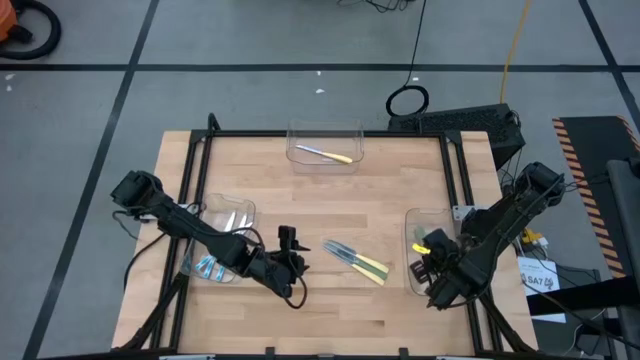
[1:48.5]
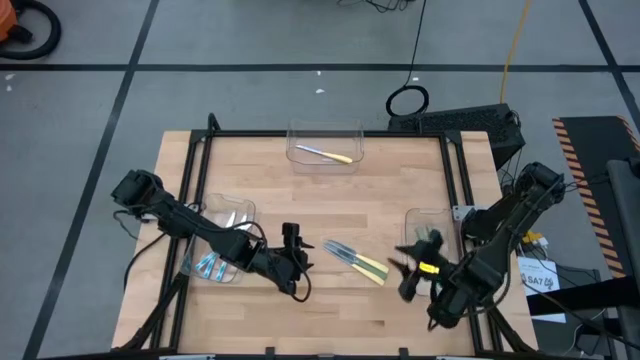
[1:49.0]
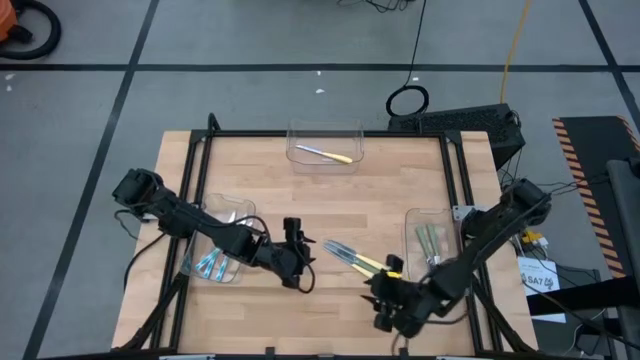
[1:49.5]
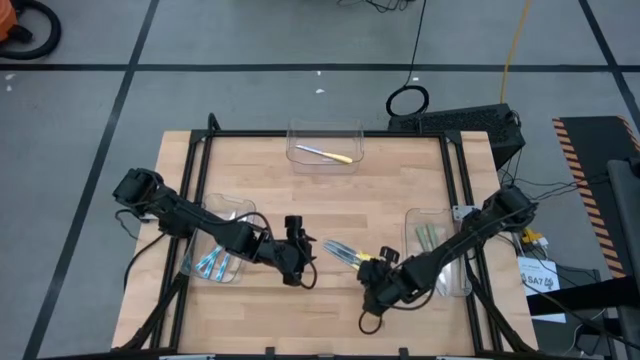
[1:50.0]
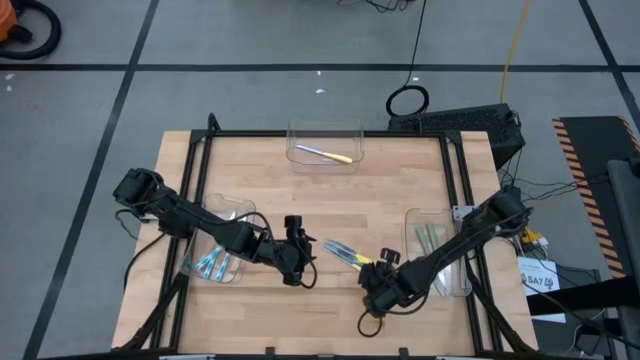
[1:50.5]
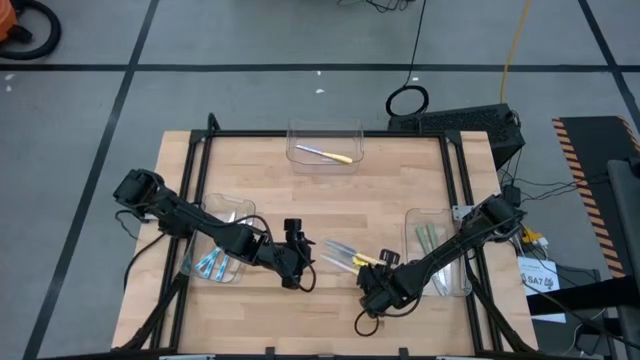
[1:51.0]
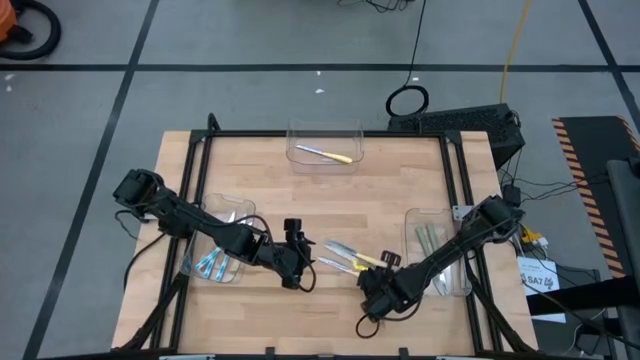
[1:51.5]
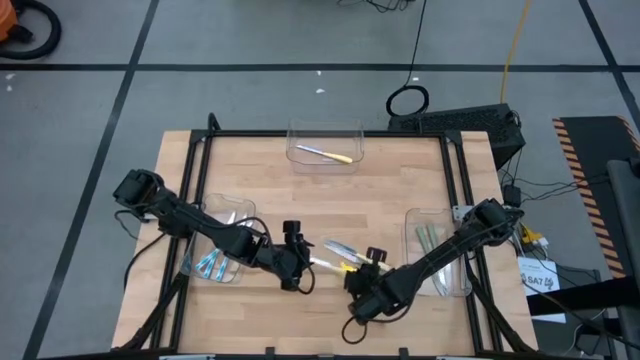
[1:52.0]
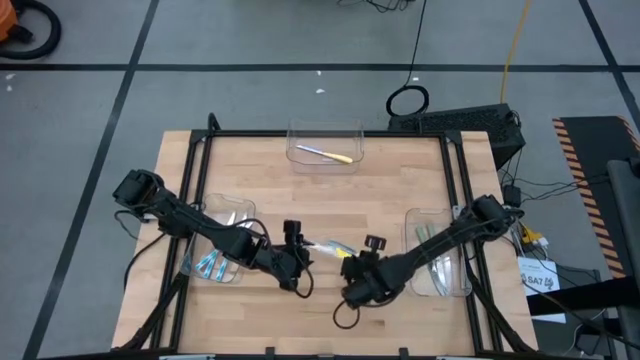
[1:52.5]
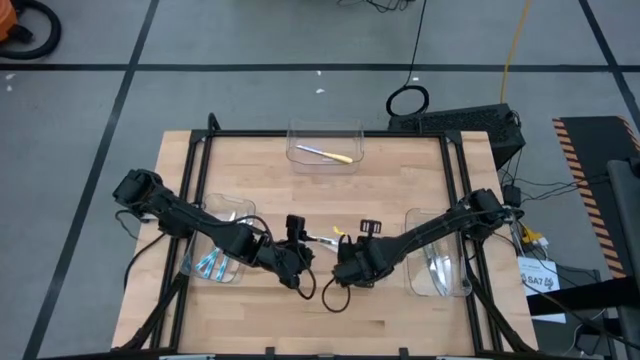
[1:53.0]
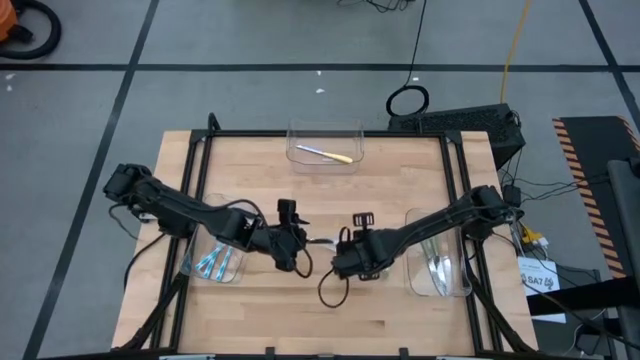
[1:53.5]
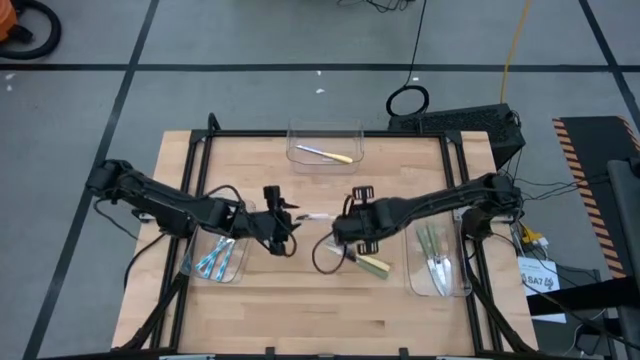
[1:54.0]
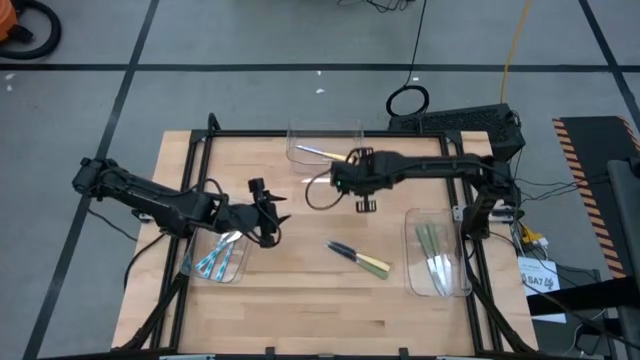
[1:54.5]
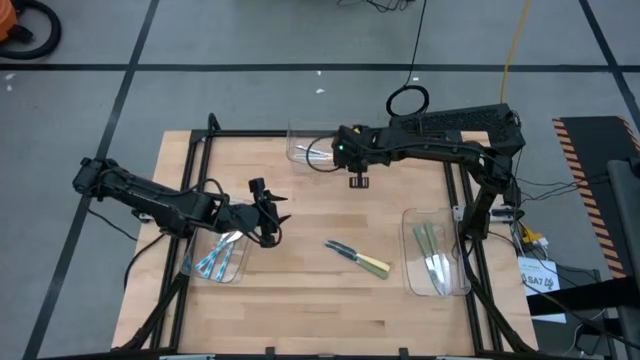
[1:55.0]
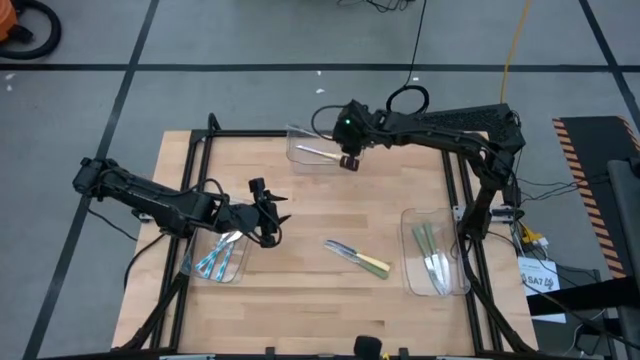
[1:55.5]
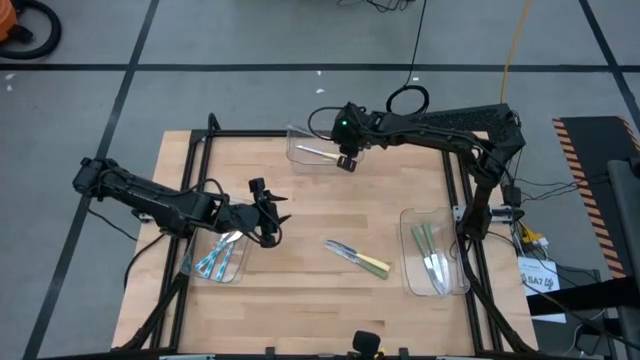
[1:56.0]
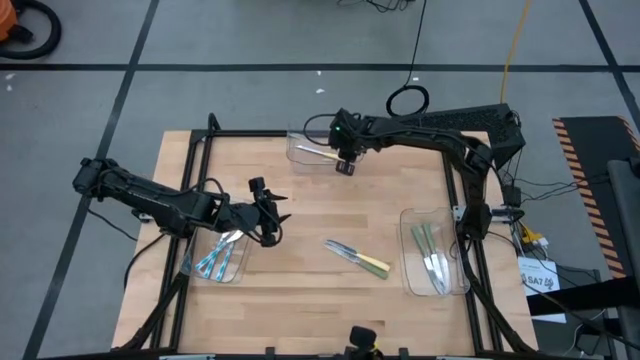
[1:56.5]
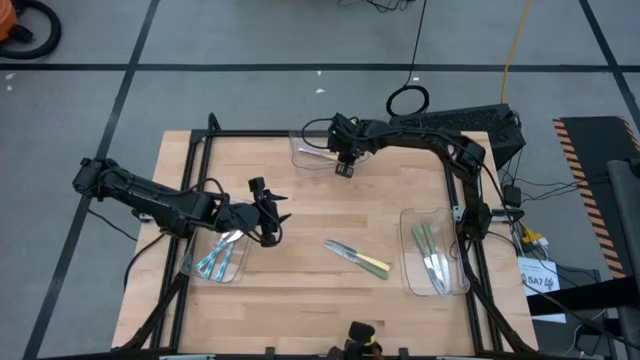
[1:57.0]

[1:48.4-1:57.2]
Task: Sort silverware by color (type)
Put the bottom yellow knife into the top center transparent bin

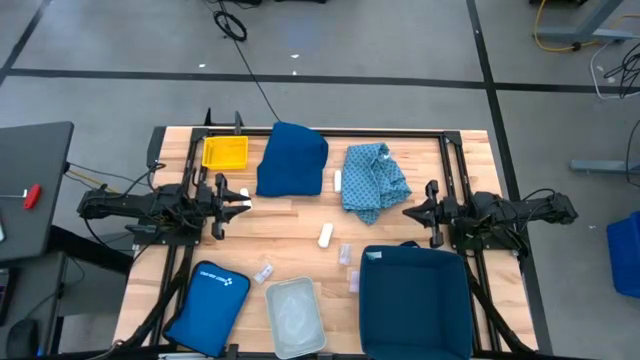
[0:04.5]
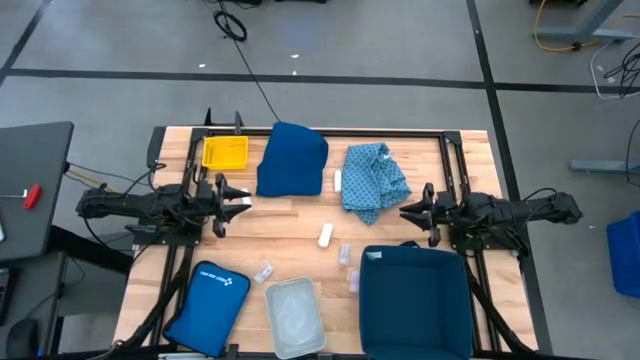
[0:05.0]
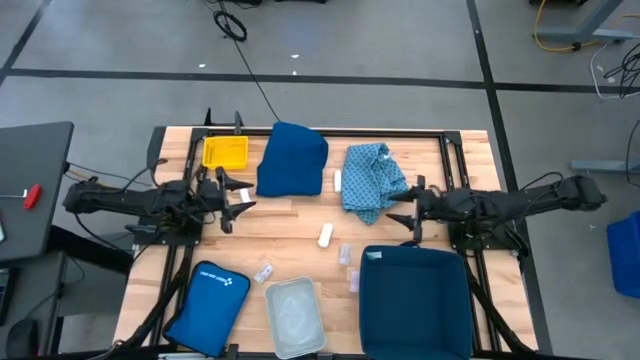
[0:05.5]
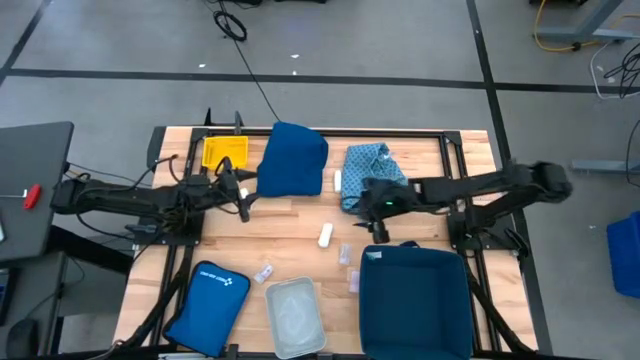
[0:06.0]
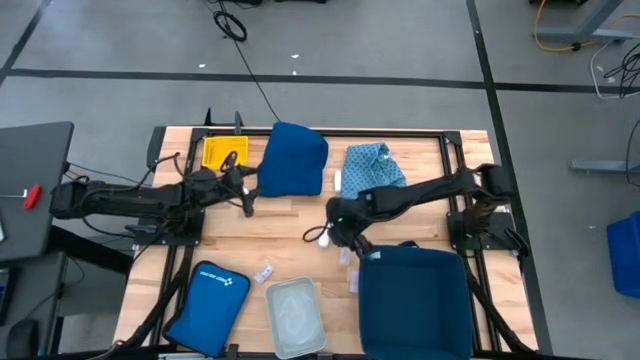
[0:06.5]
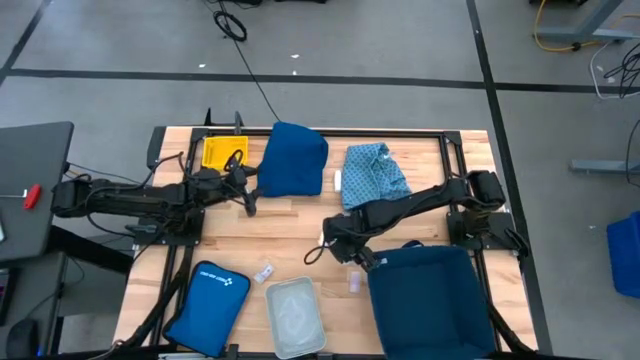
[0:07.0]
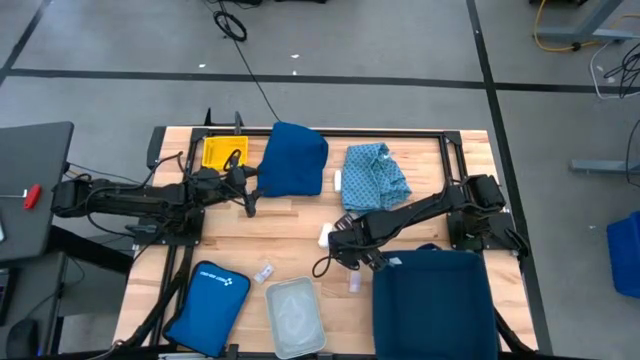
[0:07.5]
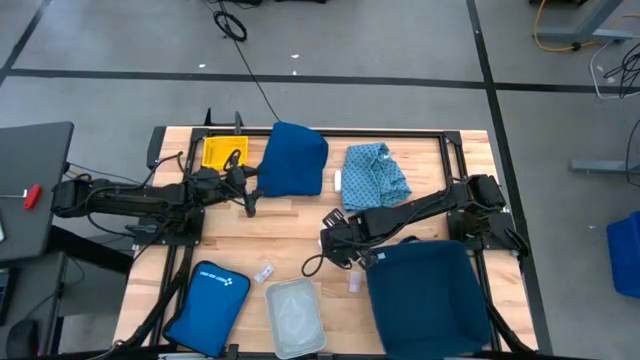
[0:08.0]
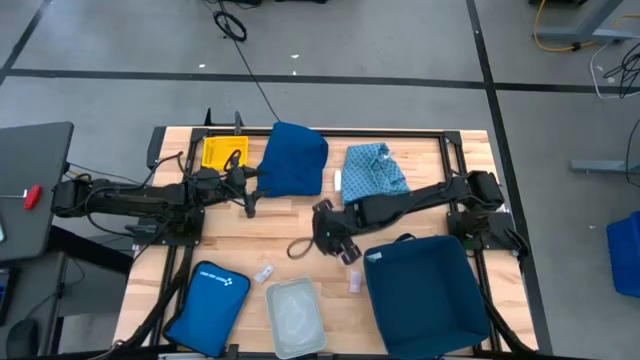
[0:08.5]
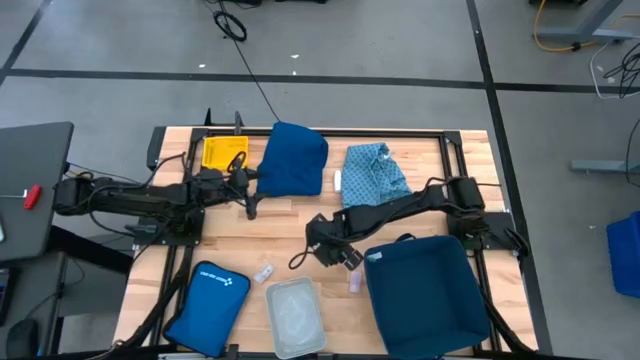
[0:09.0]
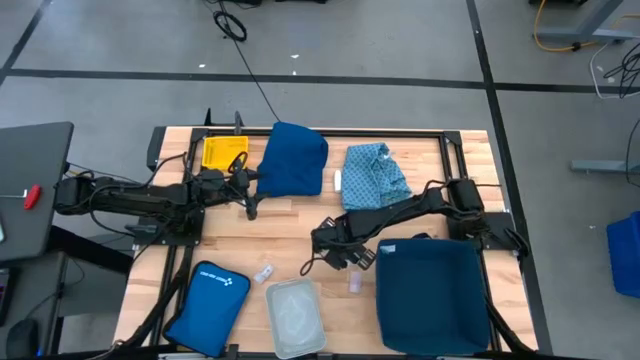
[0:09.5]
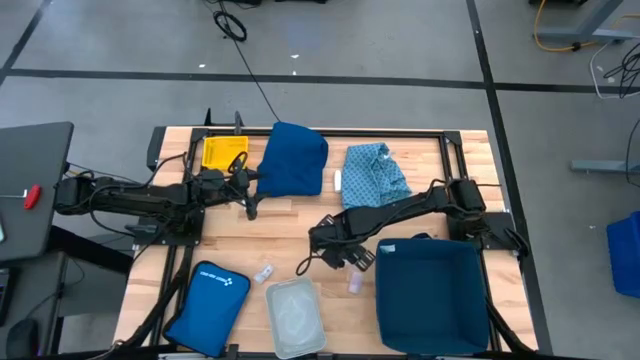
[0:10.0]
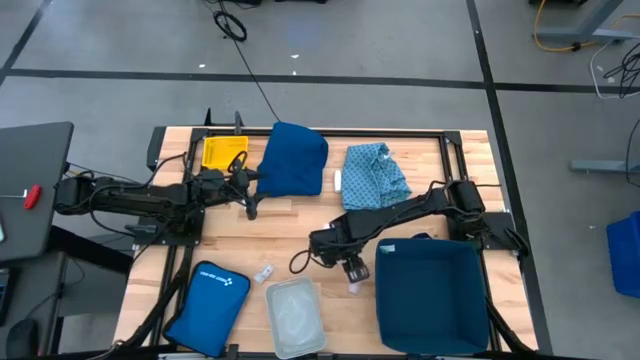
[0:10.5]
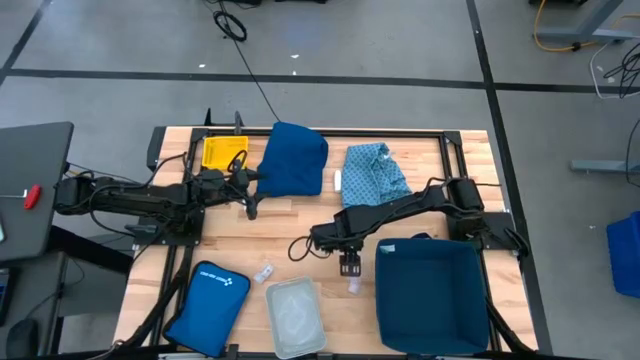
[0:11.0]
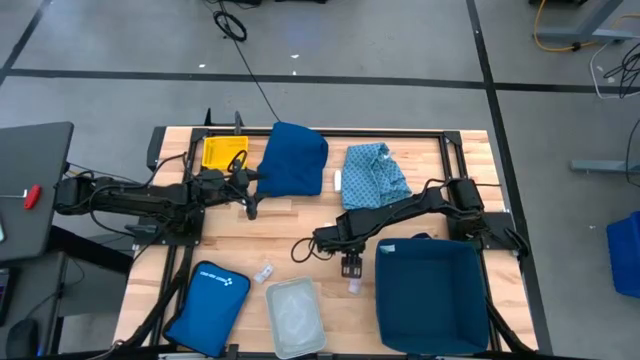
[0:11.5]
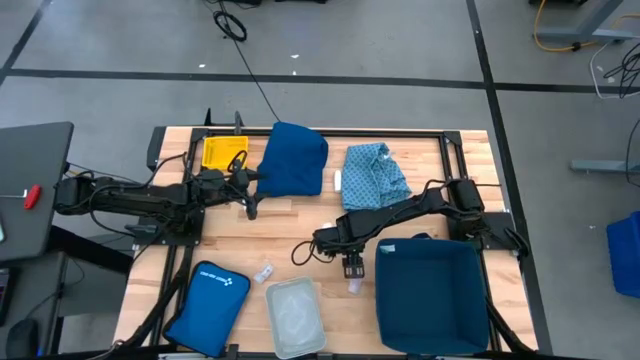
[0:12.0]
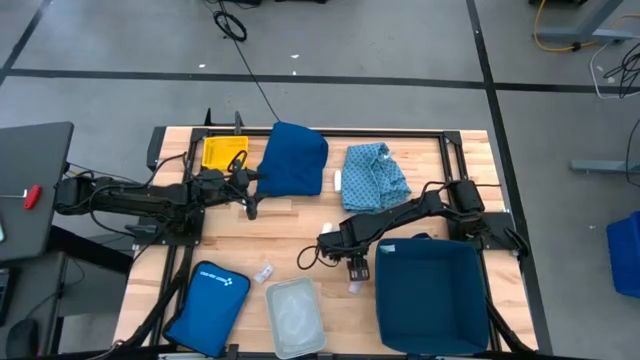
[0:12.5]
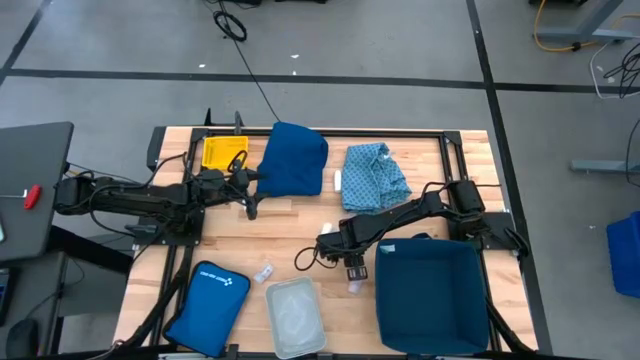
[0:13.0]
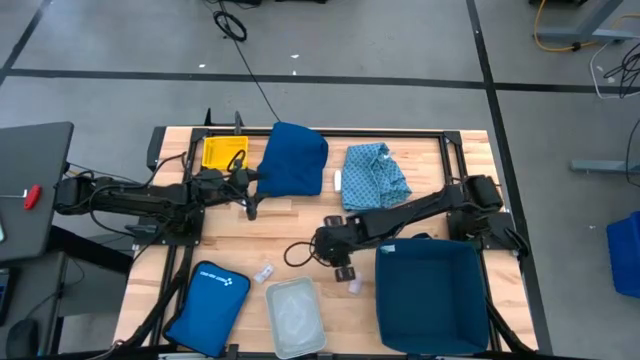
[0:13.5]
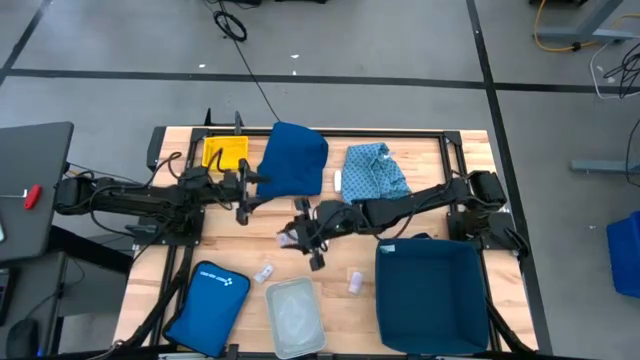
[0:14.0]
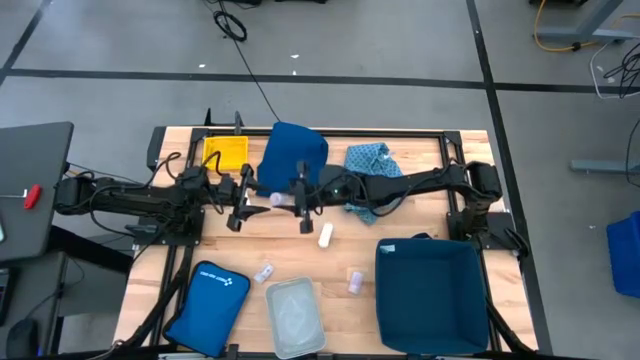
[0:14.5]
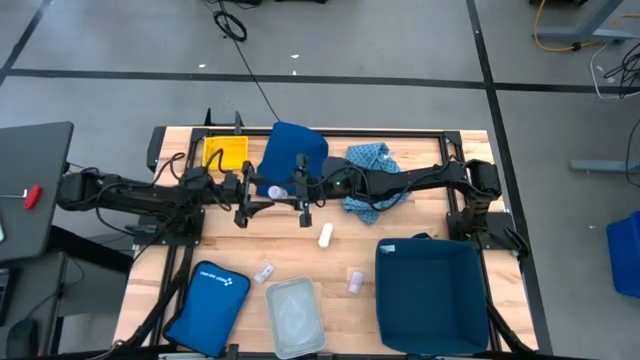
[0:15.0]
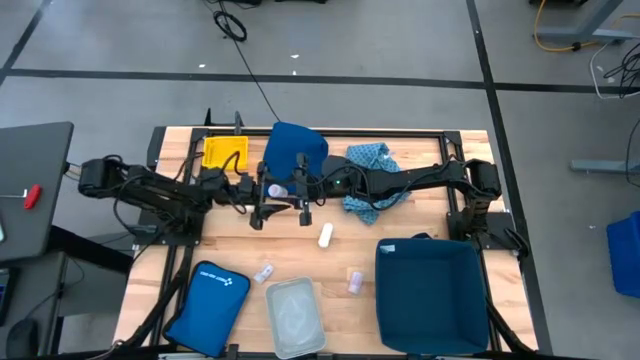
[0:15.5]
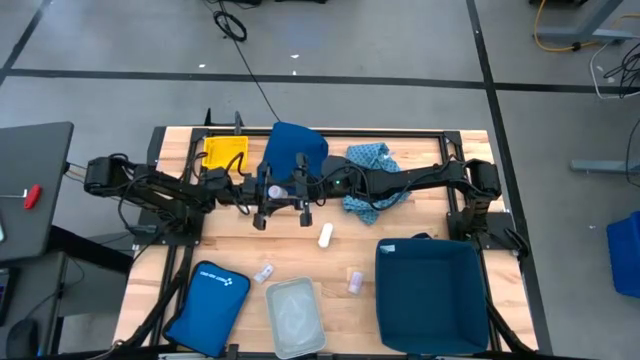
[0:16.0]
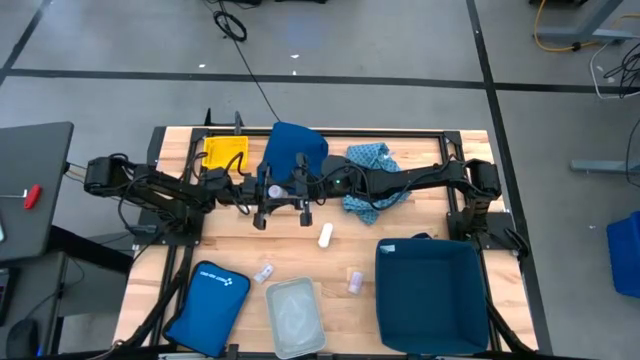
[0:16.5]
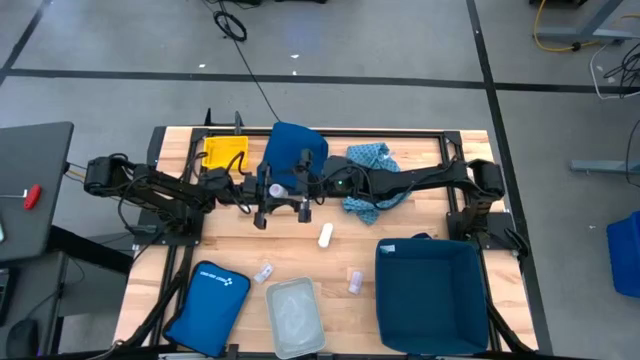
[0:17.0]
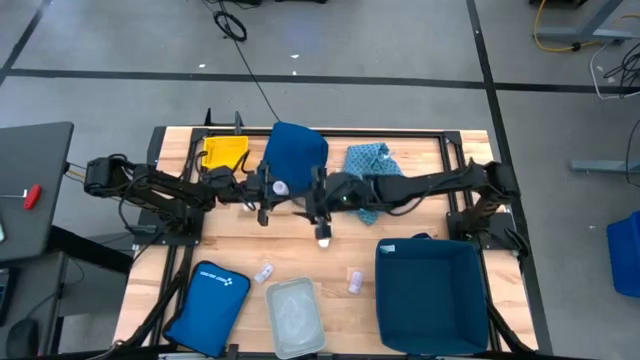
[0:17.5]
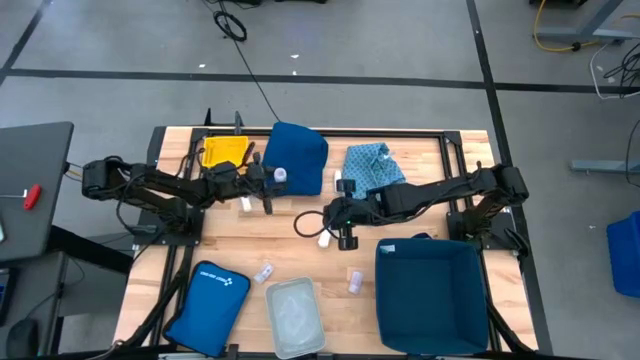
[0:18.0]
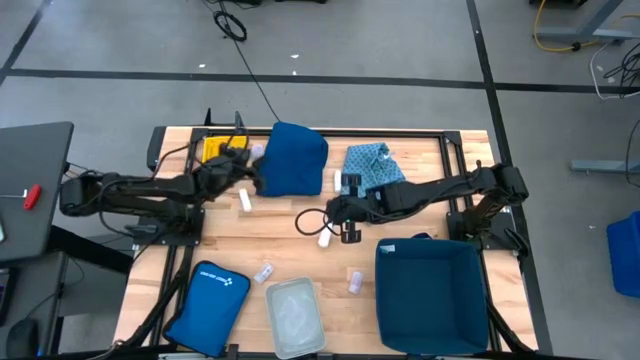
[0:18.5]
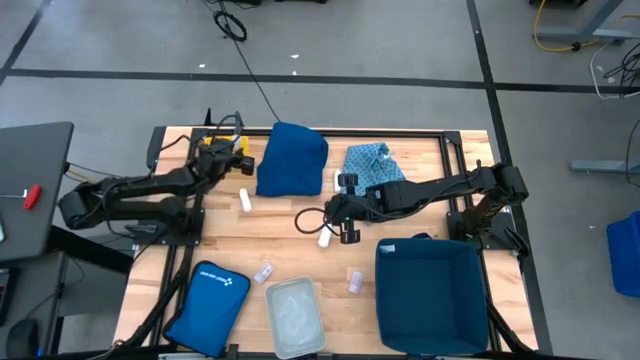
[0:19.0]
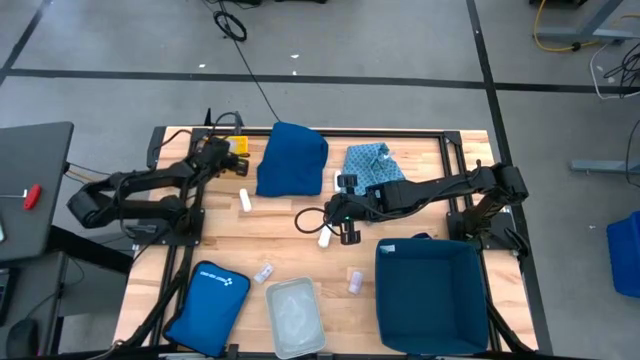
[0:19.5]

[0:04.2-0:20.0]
Task: Pick & place medical supplies in basket/bin
Put the top right white pill bottle into the yellow bin
